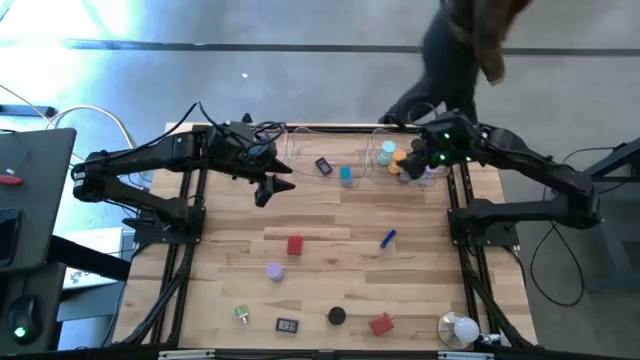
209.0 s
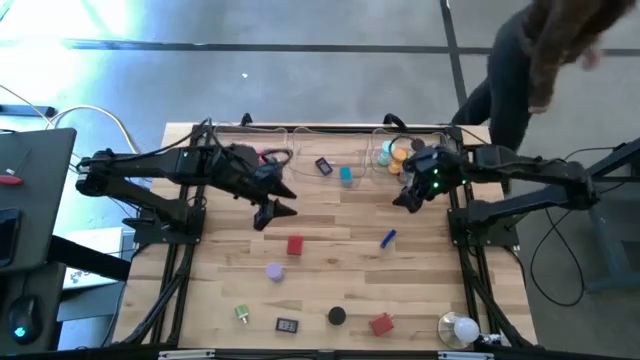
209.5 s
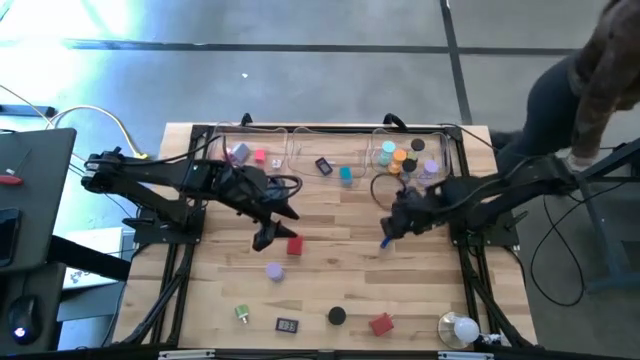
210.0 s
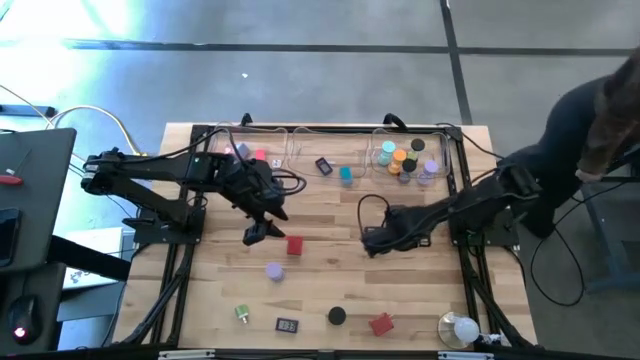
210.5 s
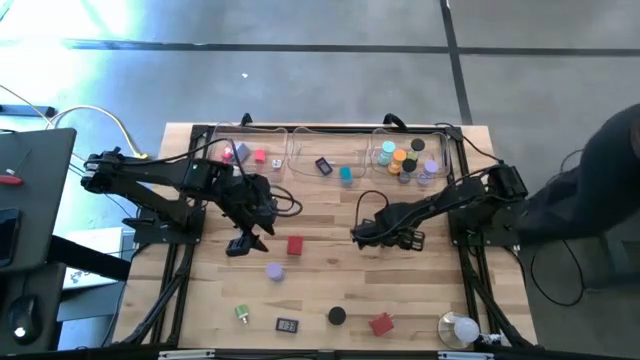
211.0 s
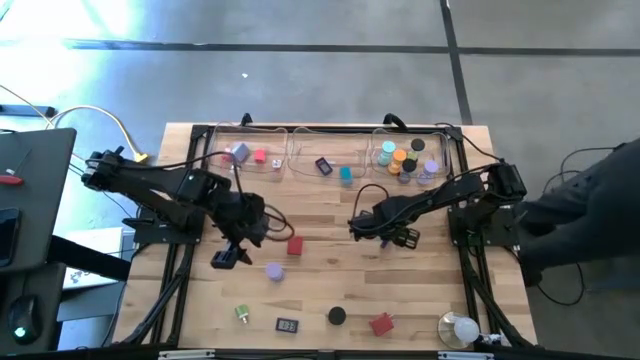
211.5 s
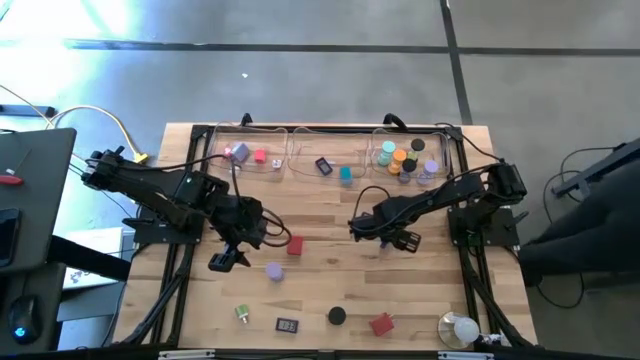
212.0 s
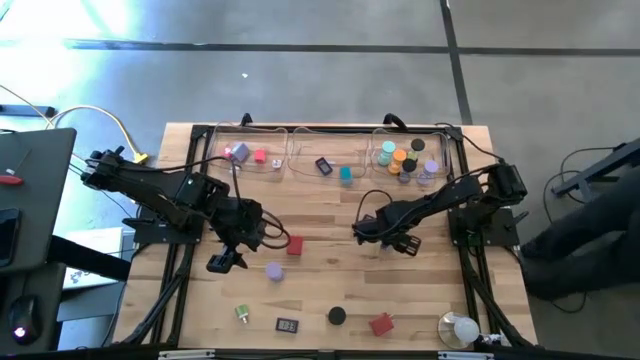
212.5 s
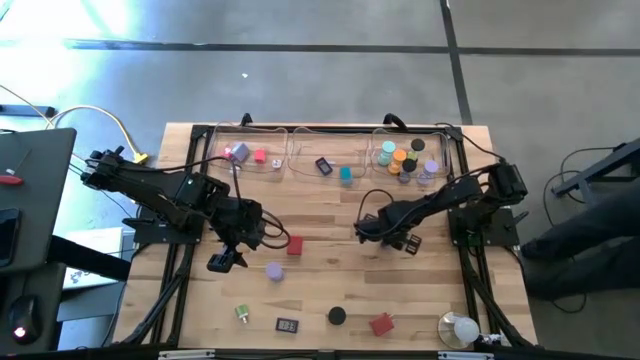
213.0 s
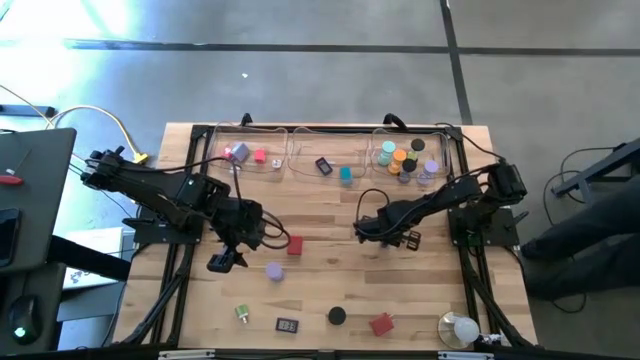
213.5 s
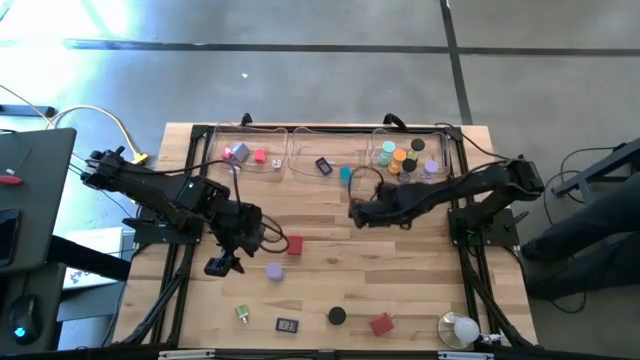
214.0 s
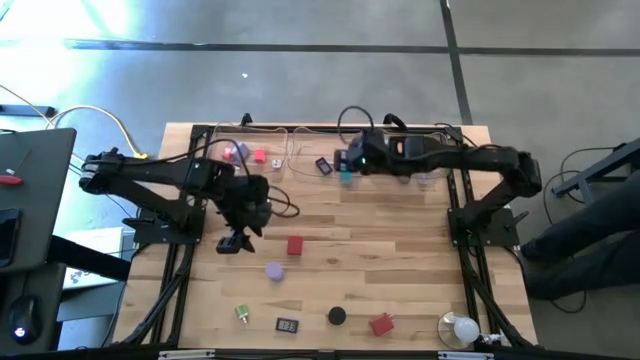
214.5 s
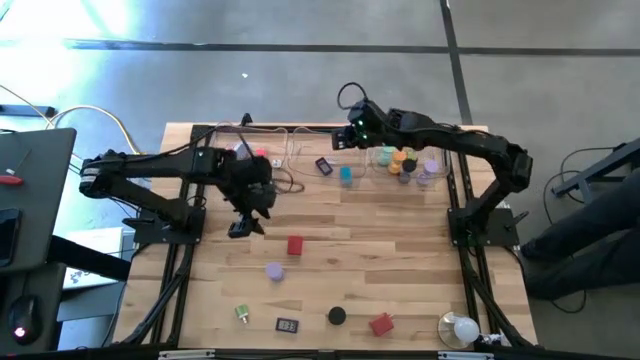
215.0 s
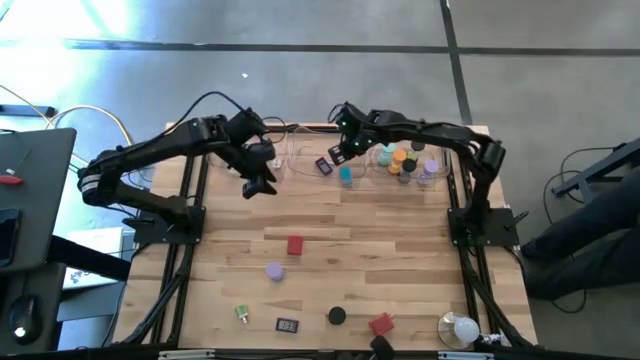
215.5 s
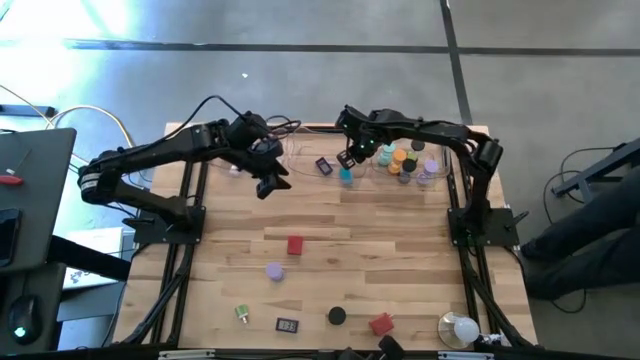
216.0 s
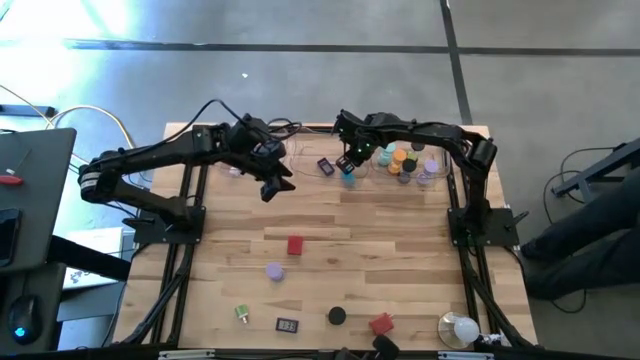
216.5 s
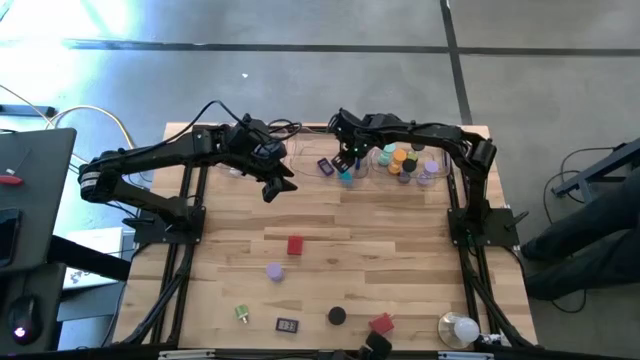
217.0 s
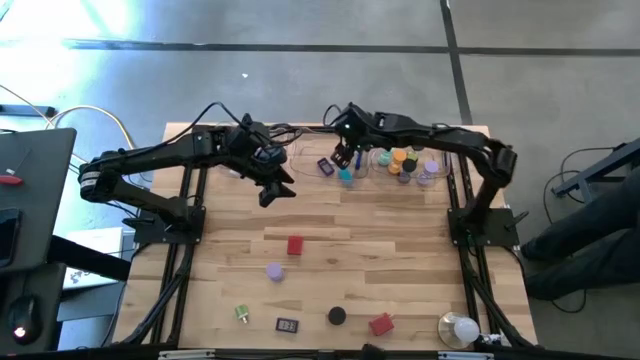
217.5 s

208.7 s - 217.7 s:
Task: Pick & Place Office items
Put the blue digital clock into the middle transparent bin

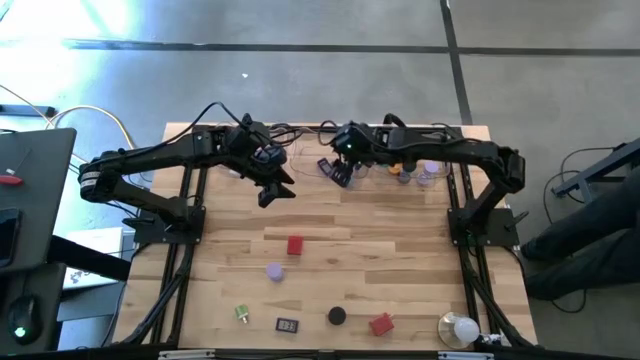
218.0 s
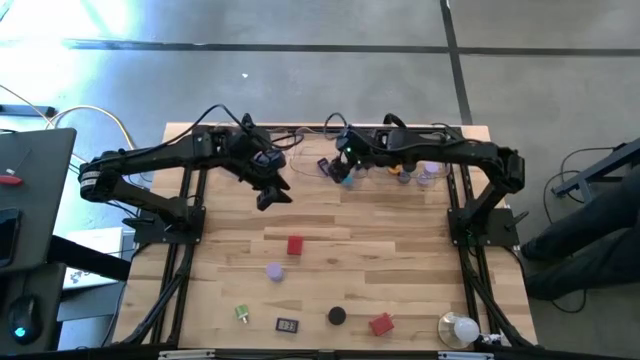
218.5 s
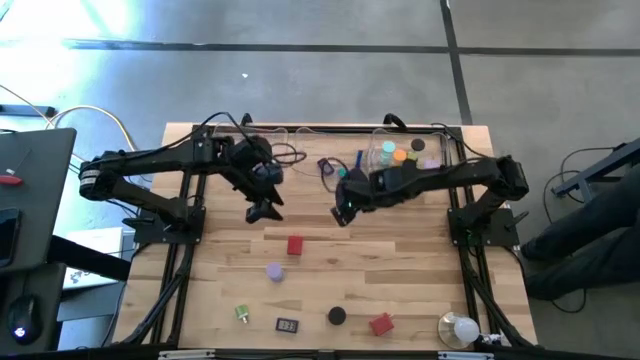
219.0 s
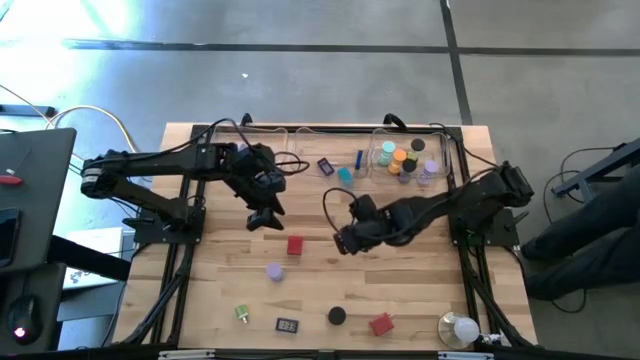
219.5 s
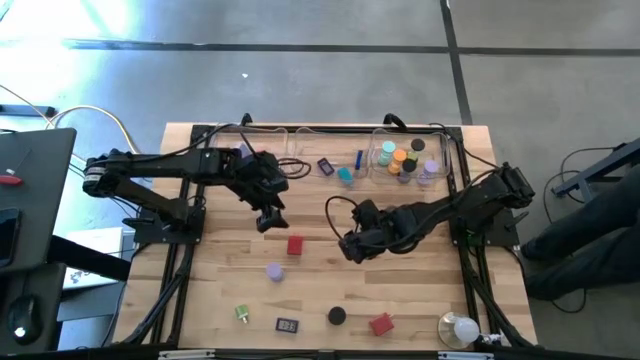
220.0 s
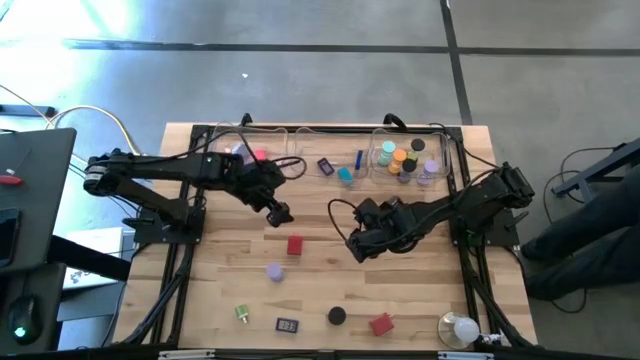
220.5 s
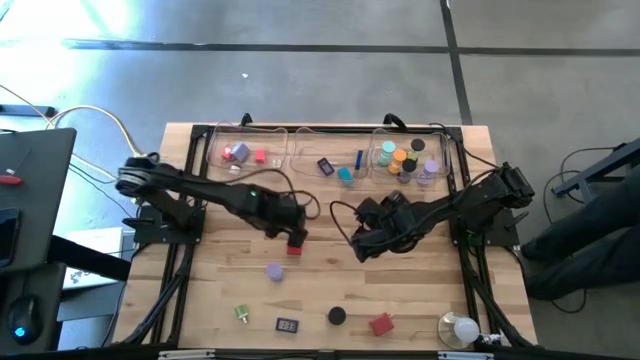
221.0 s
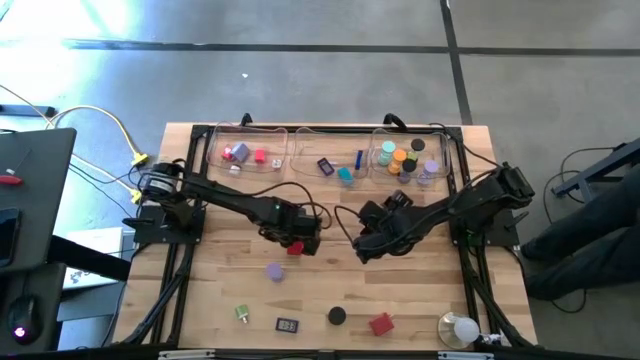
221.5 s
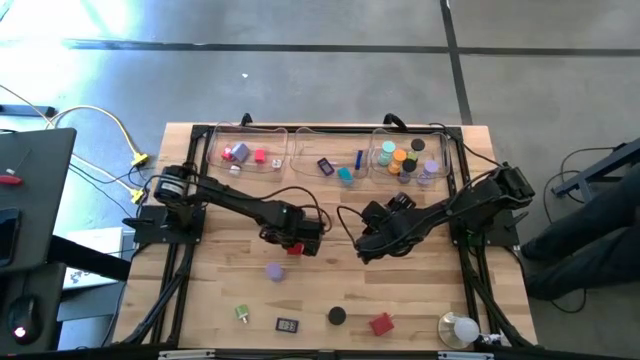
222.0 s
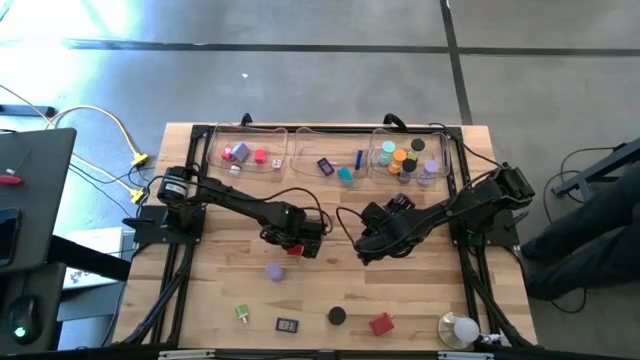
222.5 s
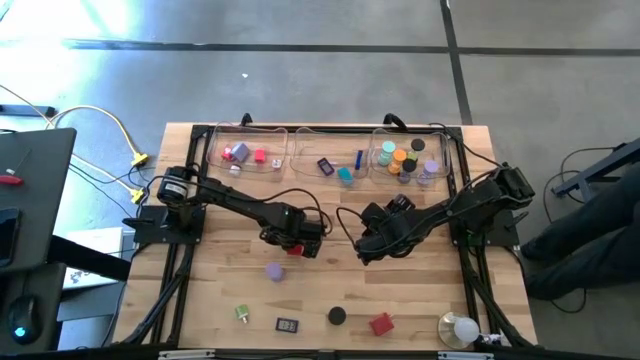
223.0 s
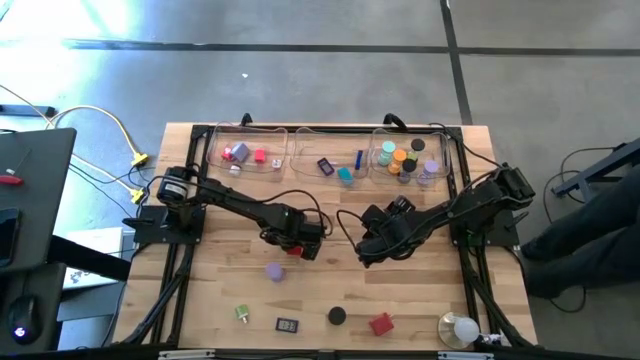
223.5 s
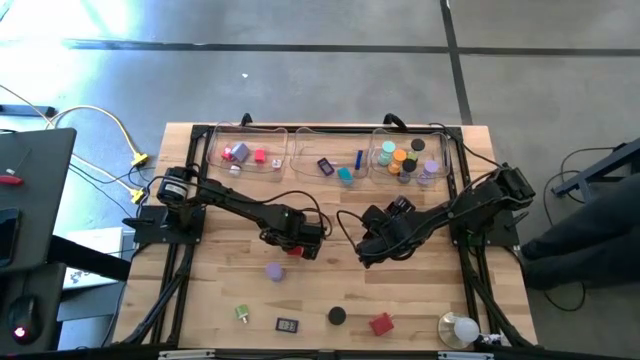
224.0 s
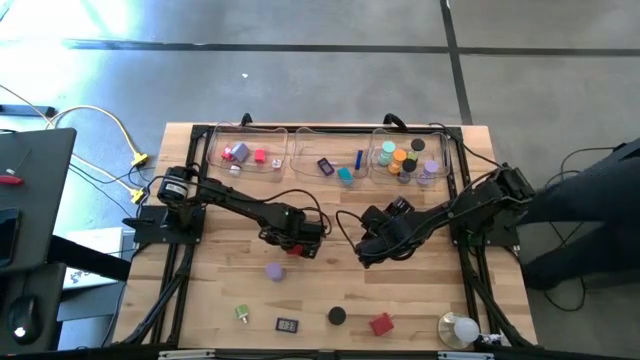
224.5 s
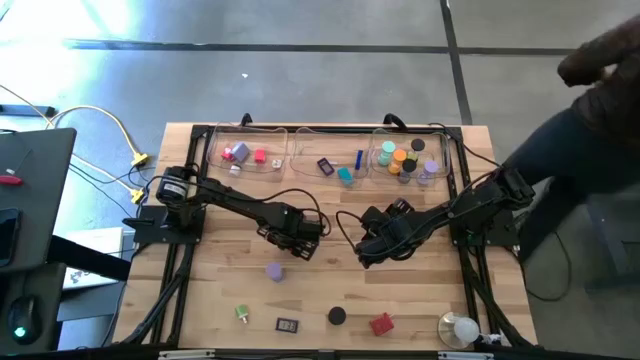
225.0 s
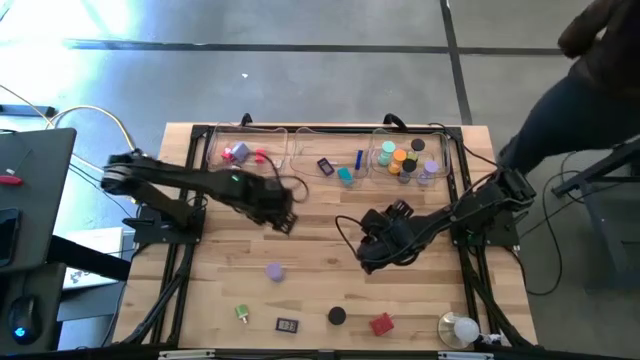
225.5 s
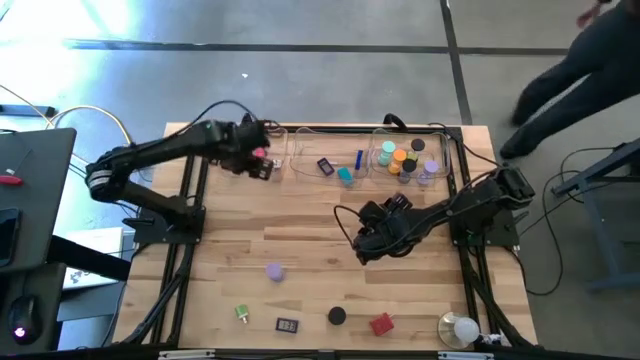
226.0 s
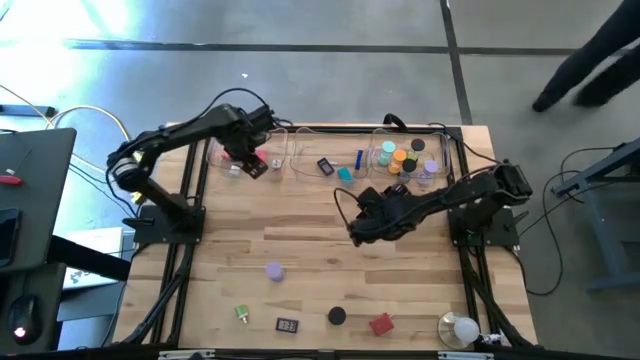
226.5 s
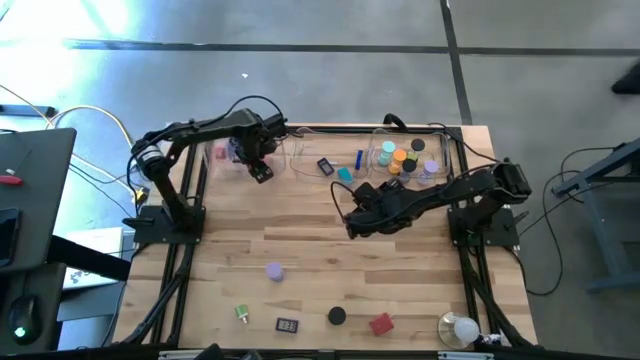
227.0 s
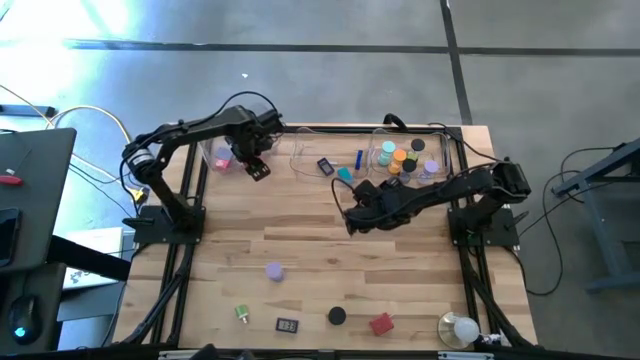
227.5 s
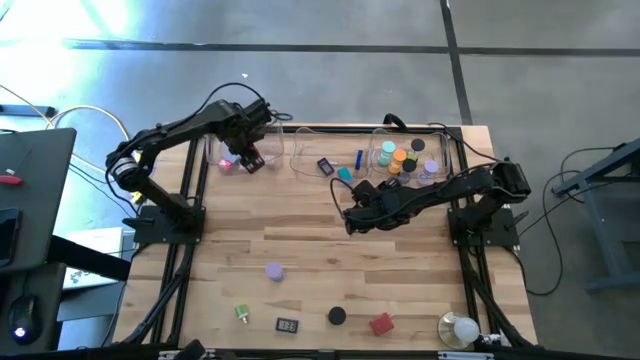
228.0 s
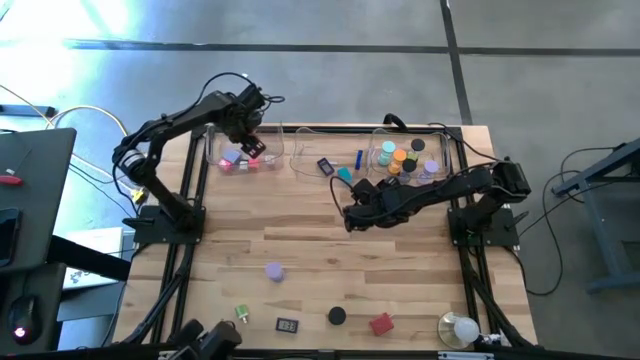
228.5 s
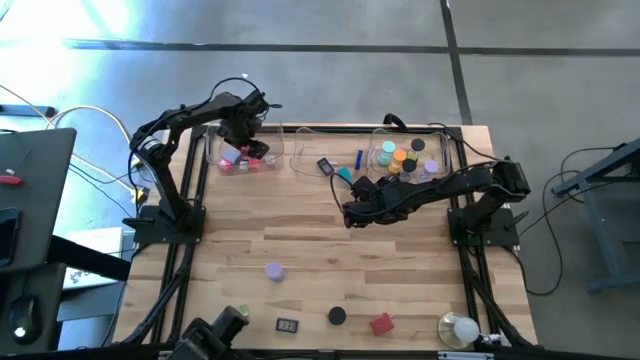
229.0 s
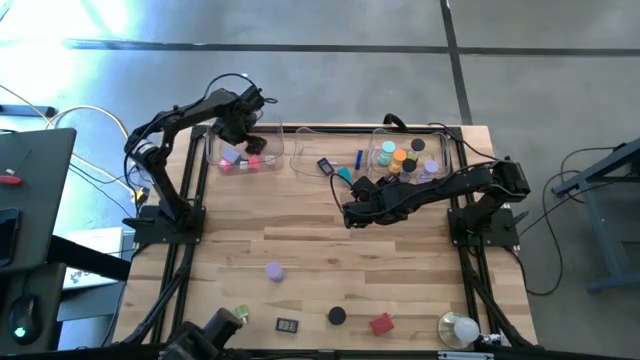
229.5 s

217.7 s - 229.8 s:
Put the top red charger adapter into the left transparent bin

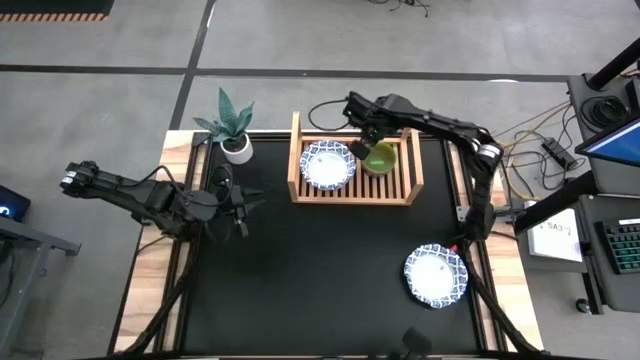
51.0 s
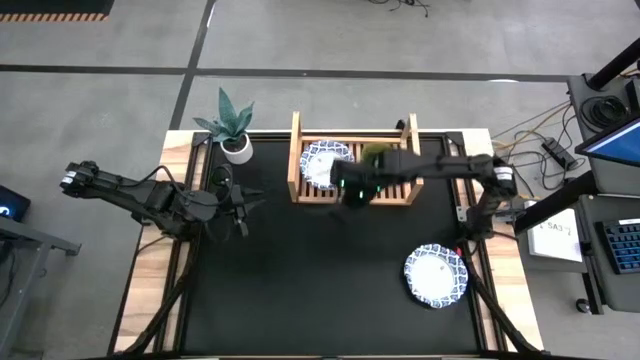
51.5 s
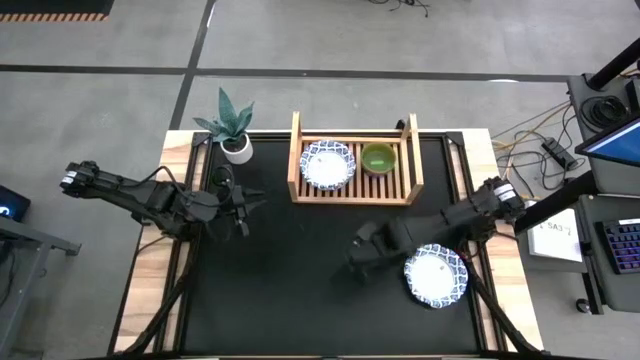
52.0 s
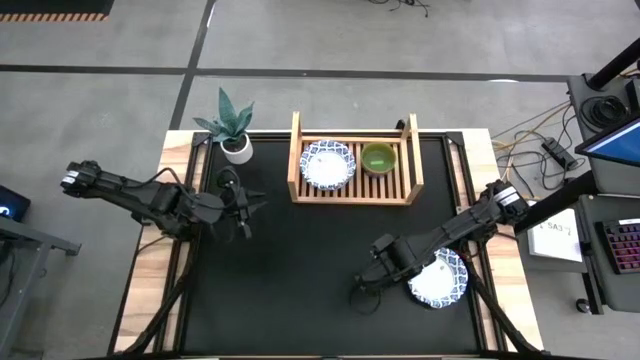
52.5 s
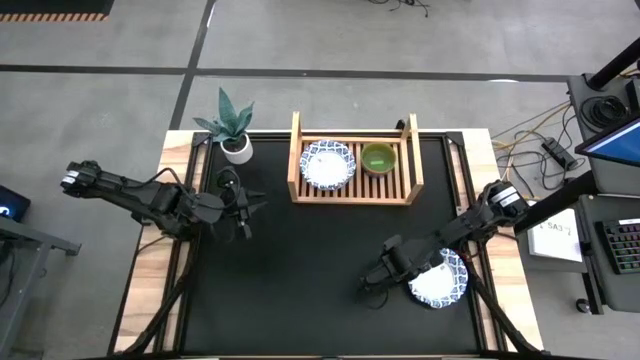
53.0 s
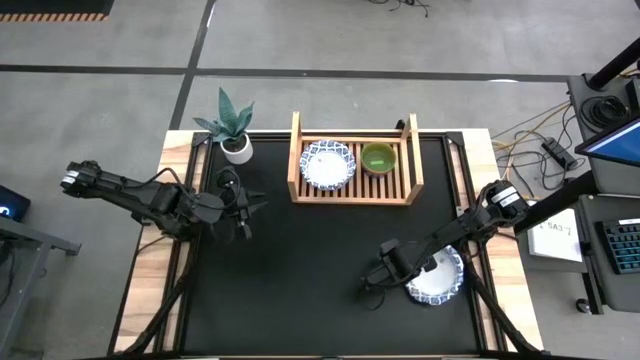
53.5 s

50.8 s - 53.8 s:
Task: Place and stack bowls onto a shelf
Stack the blue patterned bowl on top of the blue patterned bowl on the shelf
